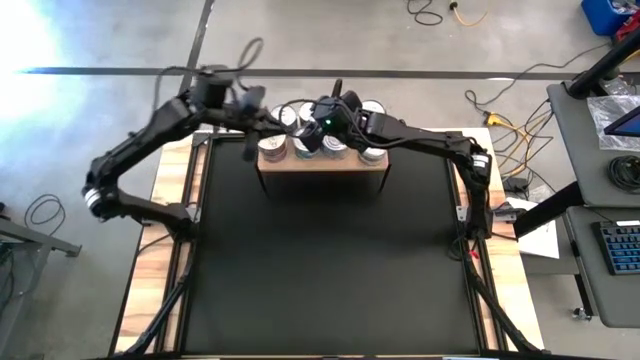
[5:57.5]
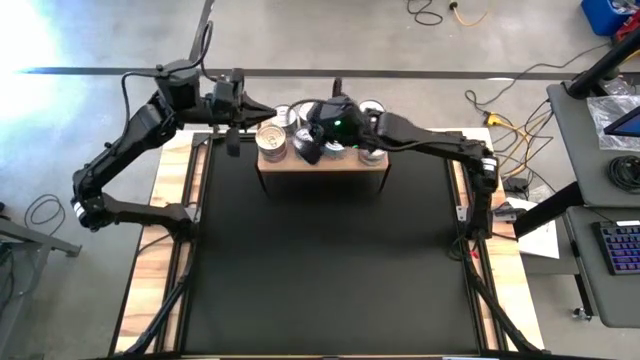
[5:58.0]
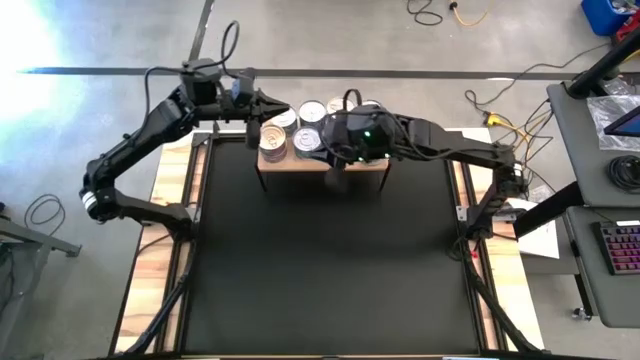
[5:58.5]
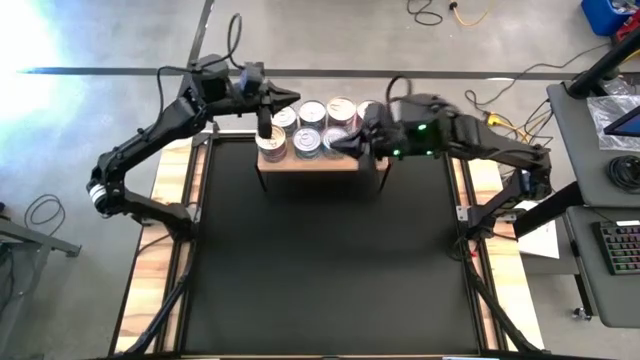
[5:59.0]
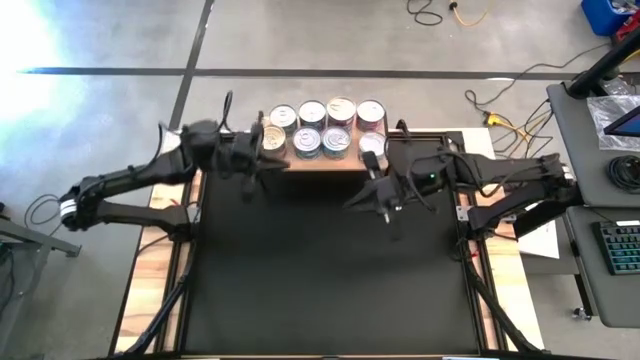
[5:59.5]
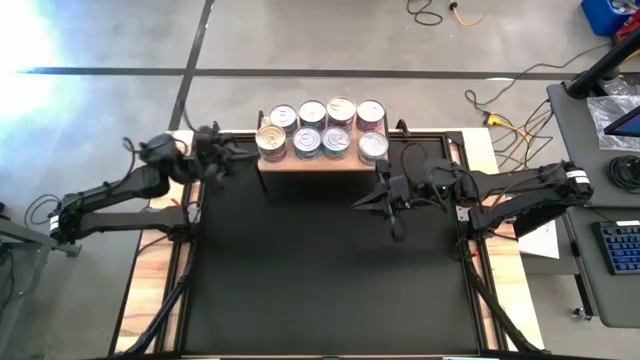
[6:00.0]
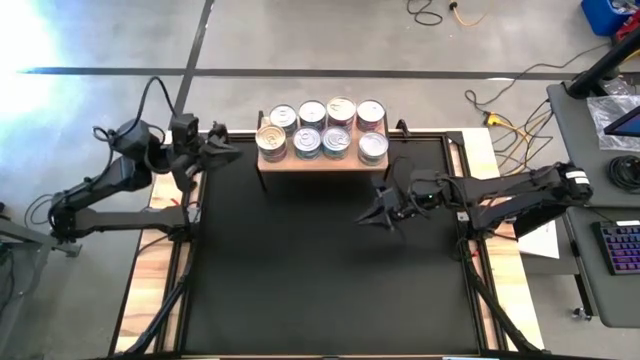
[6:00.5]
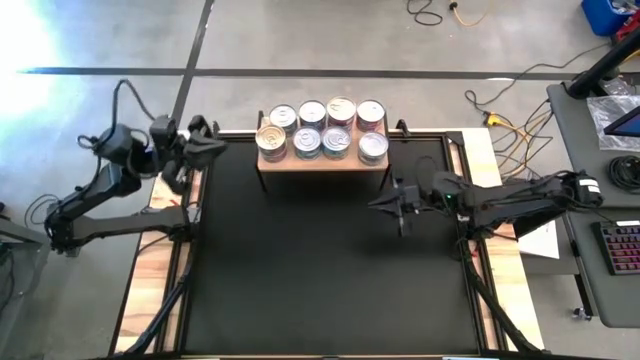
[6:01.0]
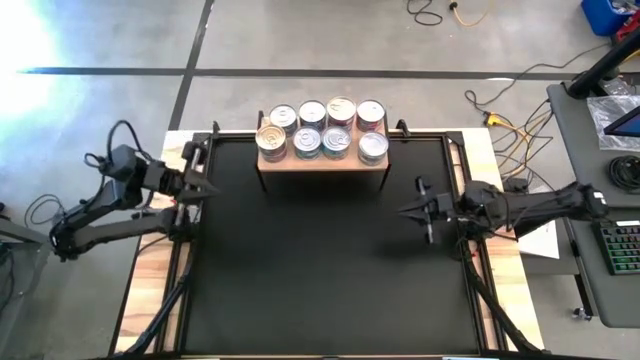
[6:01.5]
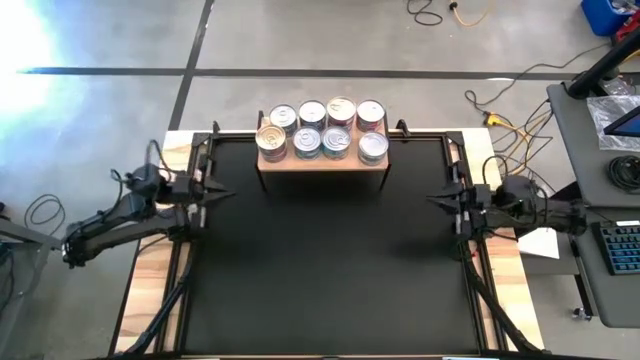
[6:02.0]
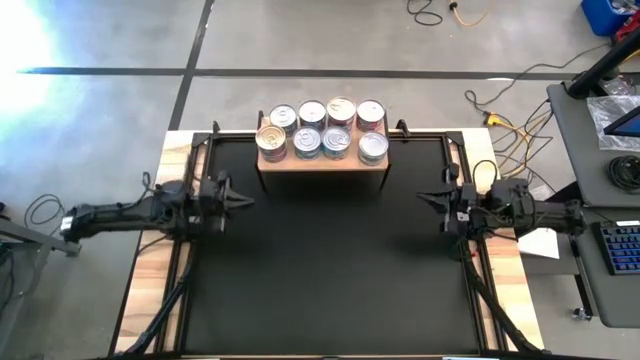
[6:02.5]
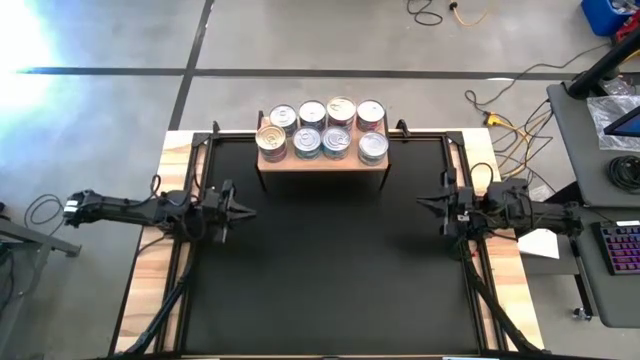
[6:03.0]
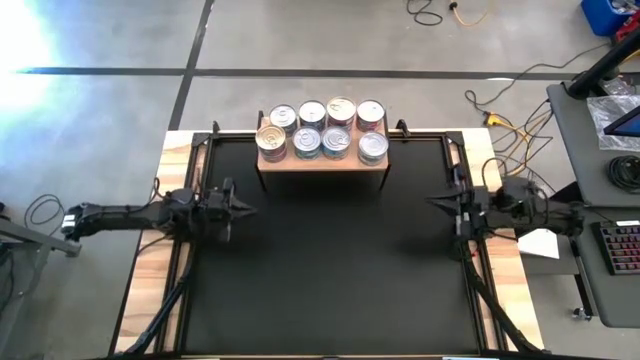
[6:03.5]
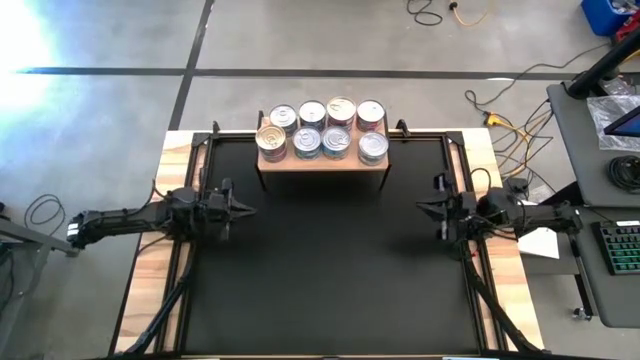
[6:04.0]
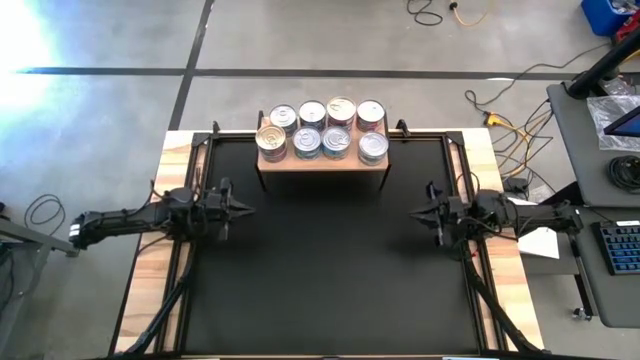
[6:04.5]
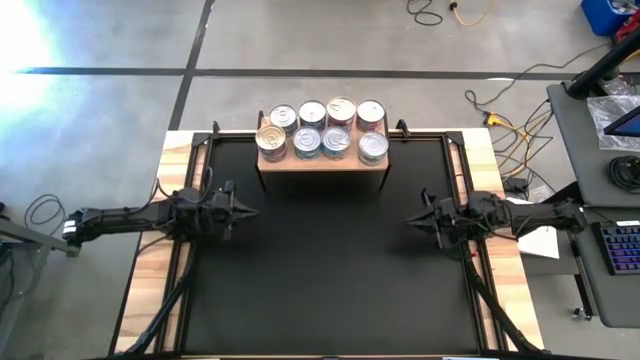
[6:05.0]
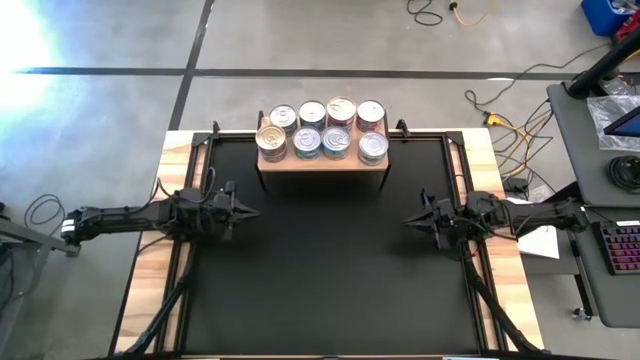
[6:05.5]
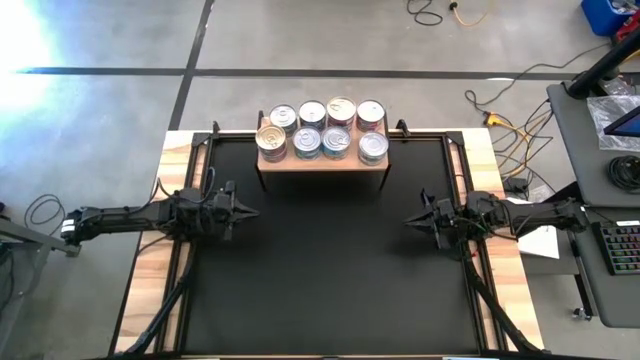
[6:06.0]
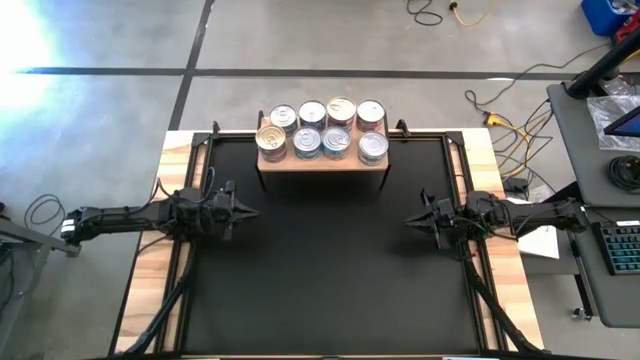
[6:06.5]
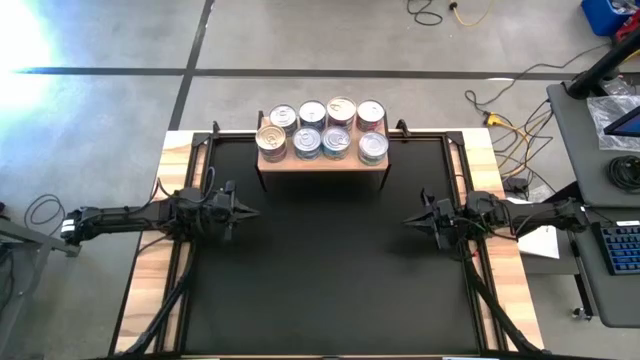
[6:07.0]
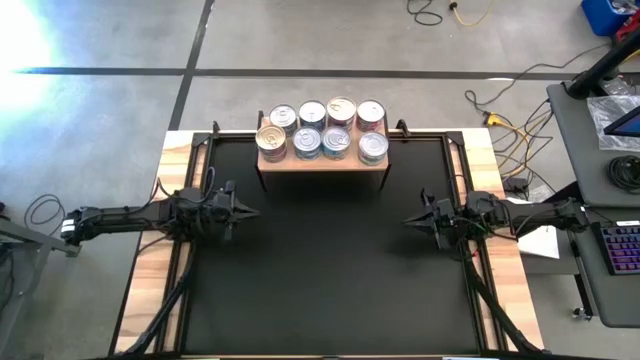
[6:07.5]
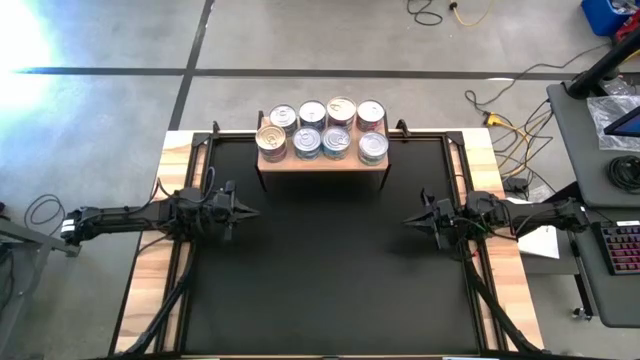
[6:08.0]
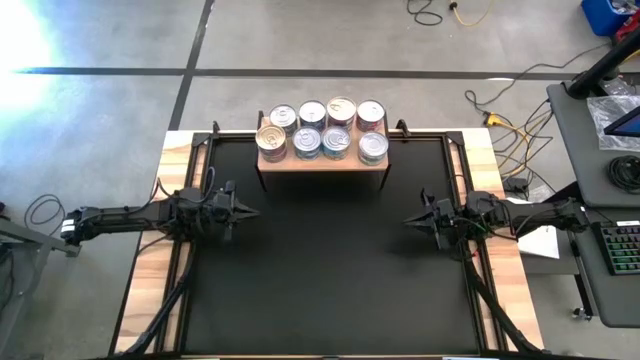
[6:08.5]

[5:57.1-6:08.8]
Task: Stack canned seafood by type on shelf
Return to Home Position

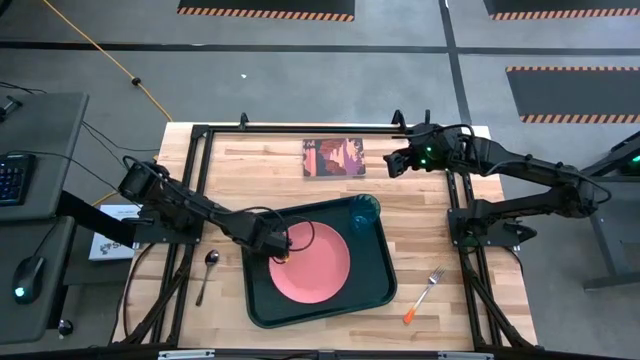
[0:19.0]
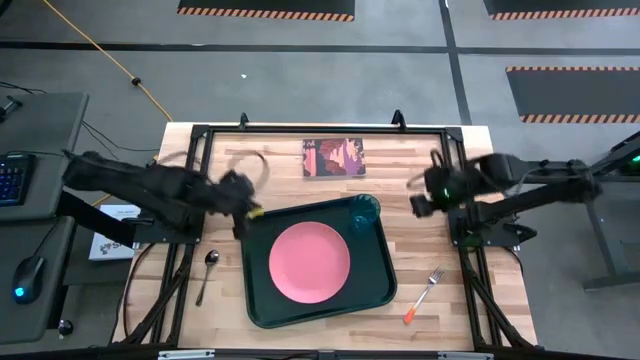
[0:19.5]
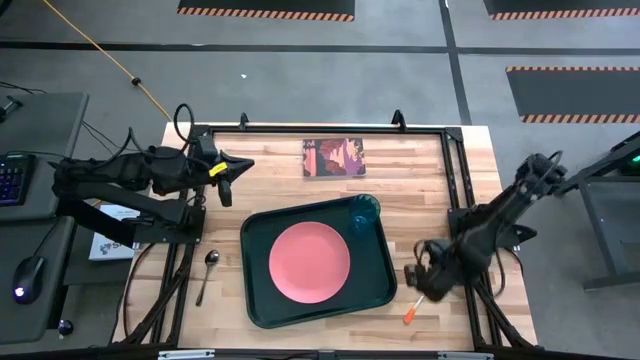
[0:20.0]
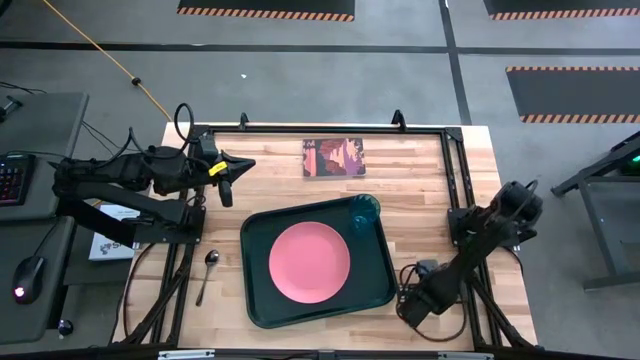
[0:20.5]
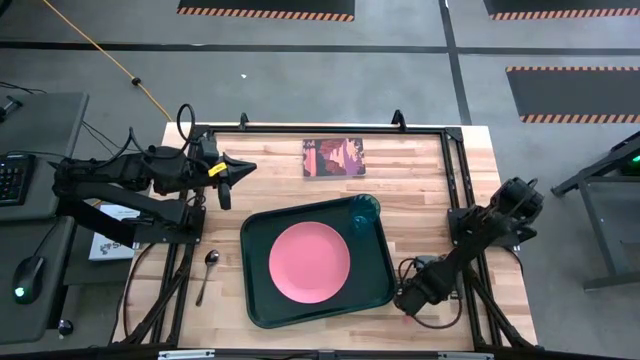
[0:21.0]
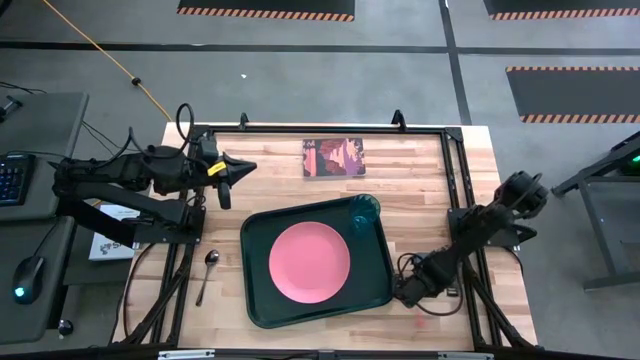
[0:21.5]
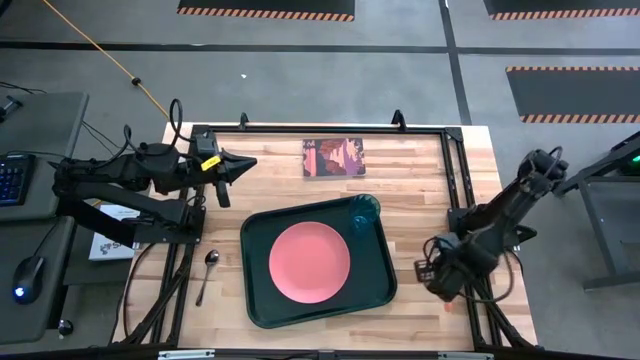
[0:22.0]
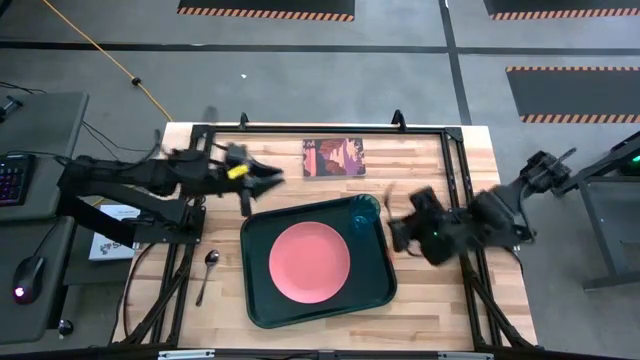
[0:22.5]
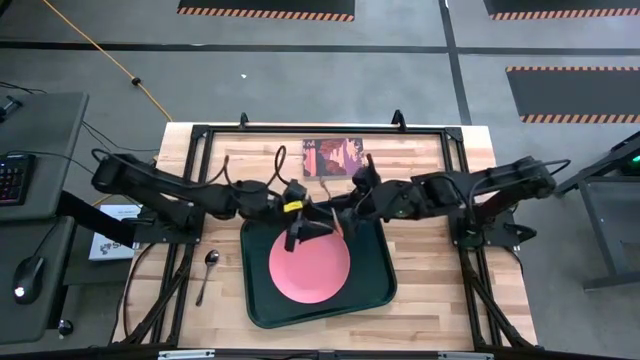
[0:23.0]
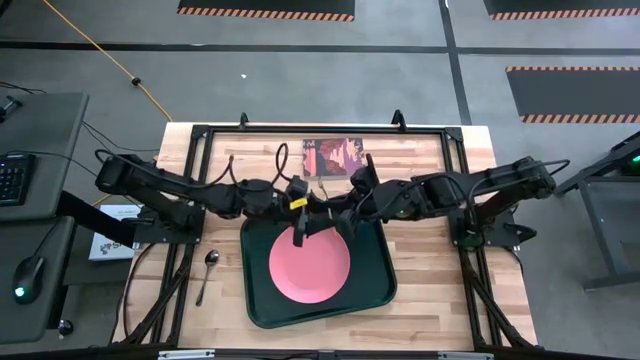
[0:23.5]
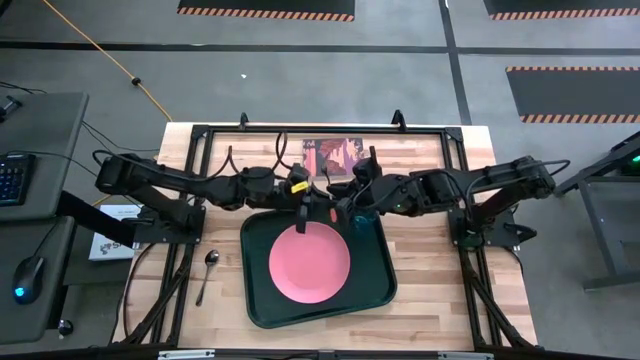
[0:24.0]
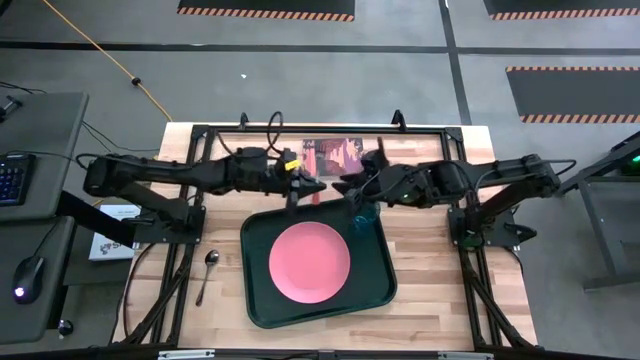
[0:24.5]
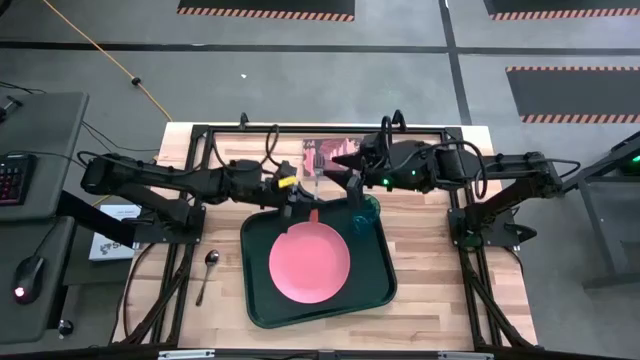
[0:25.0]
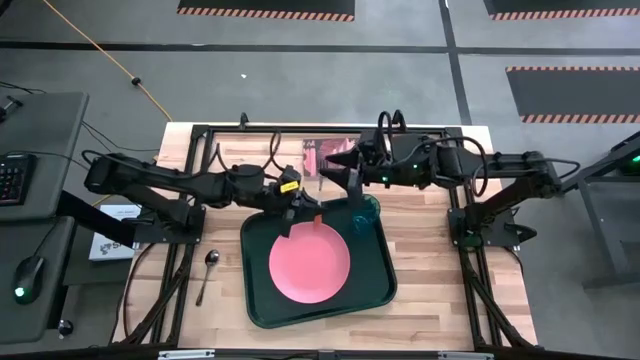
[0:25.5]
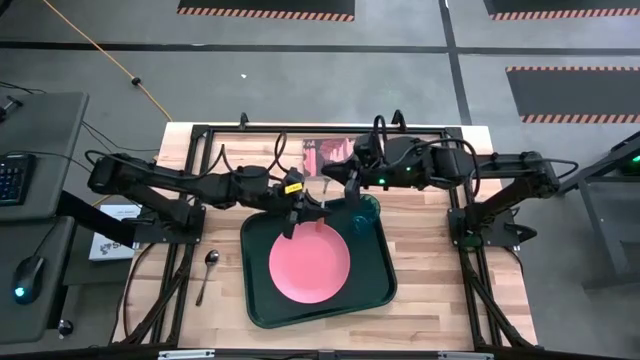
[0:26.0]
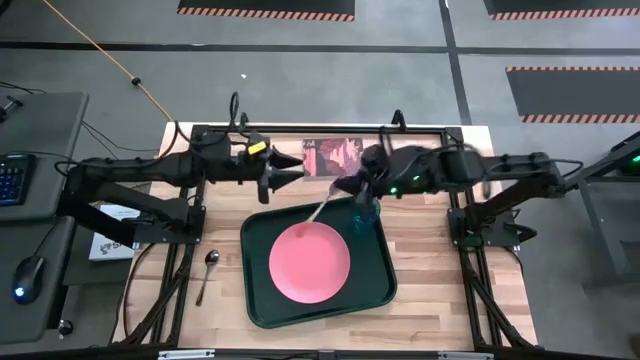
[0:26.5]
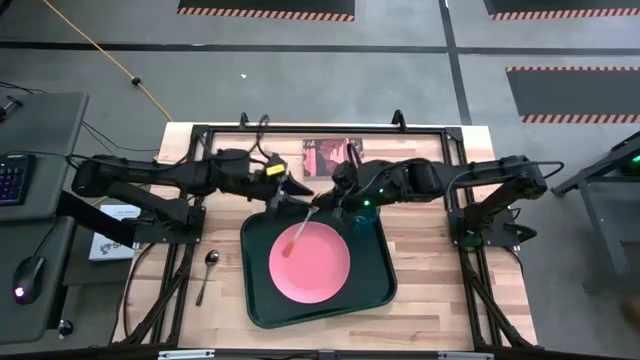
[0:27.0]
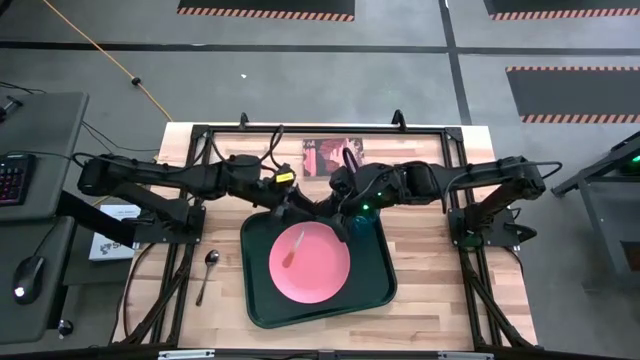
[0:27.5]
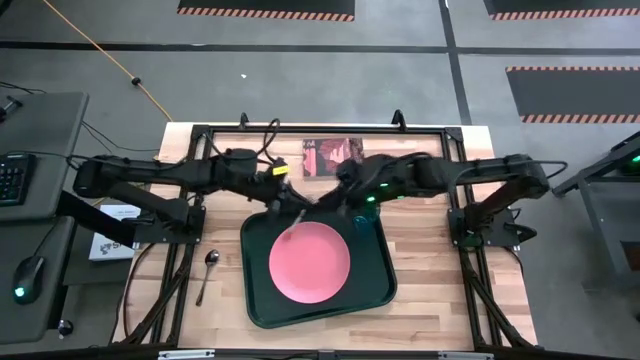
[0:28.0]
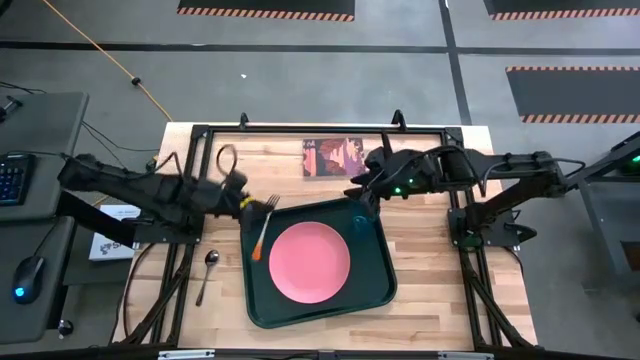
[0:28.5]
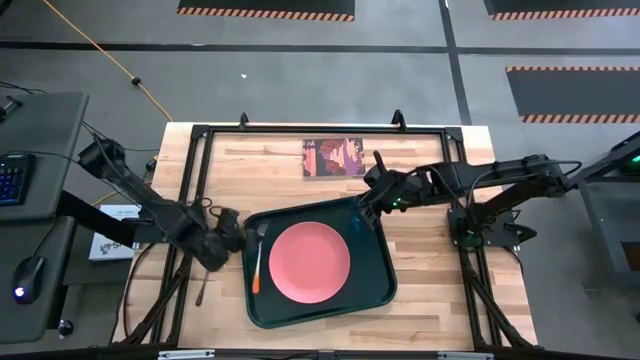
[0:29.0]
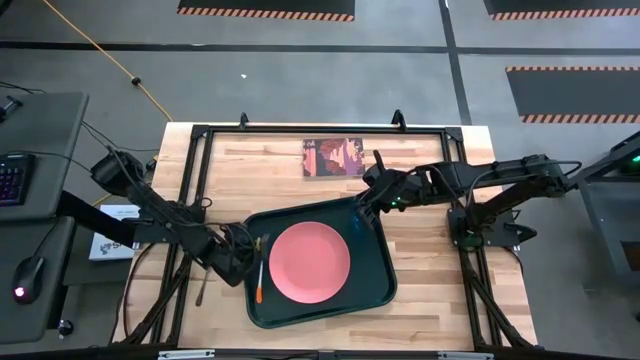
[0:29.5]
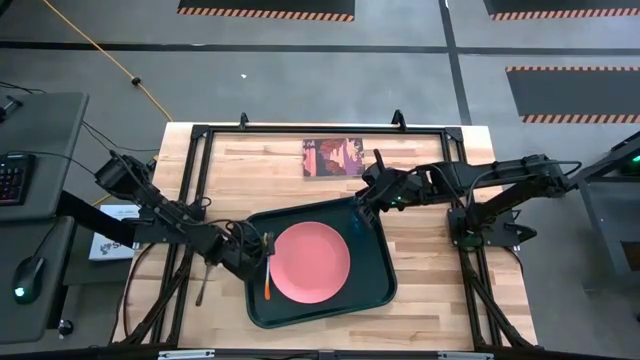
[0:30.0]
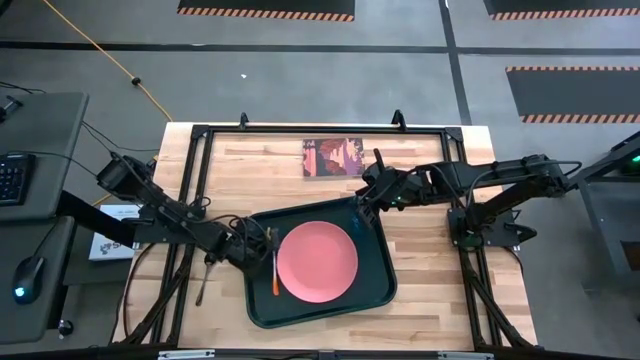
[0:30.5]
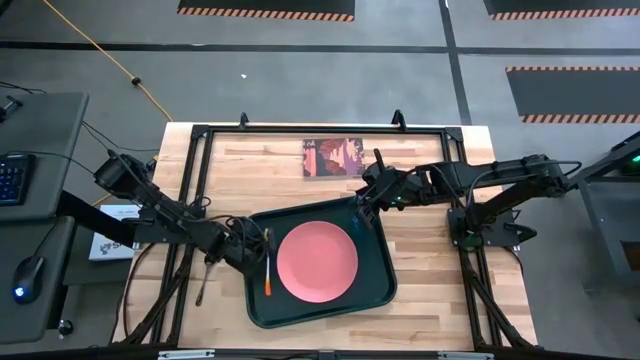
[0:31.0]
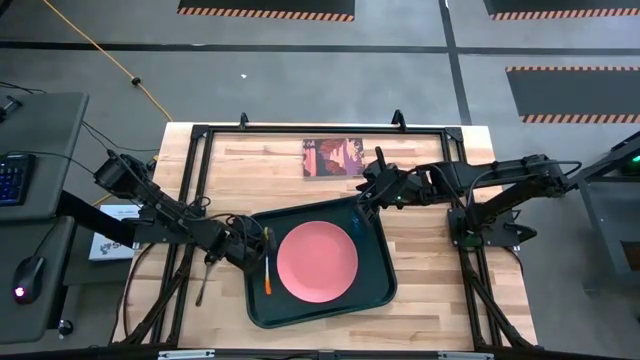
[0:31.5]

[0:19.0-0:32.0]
Task: Pick and place plate/cup/fork/spoon on tray
Put the orange fork to the left side of the pink plate on the black tray
